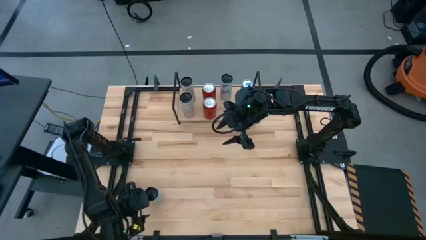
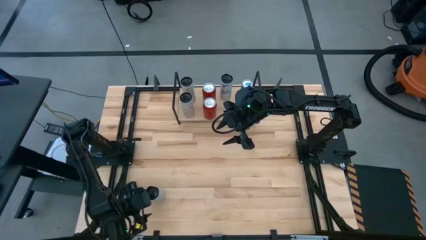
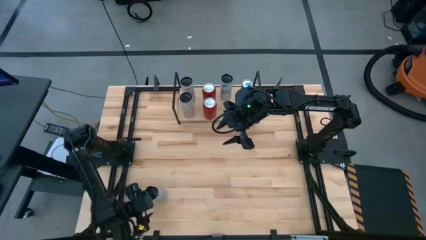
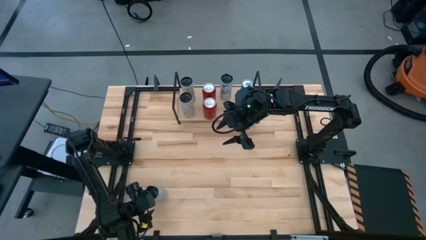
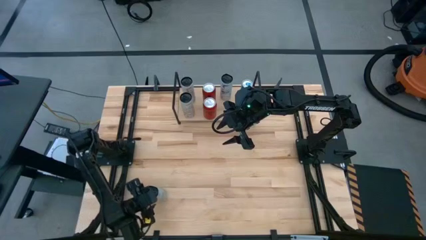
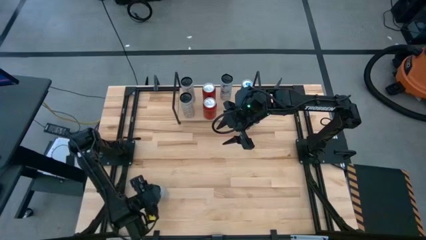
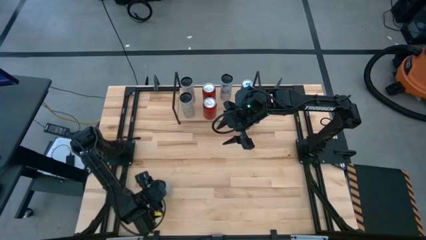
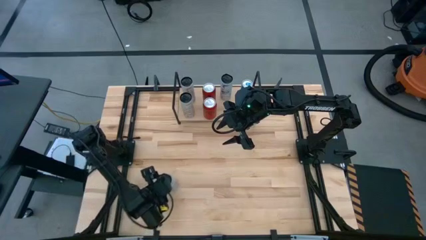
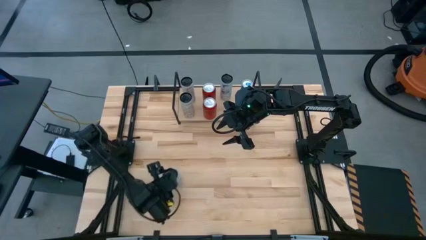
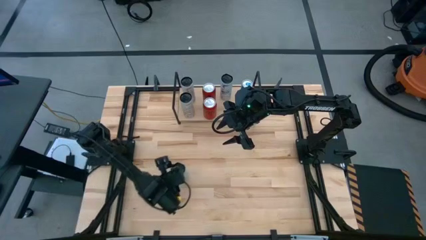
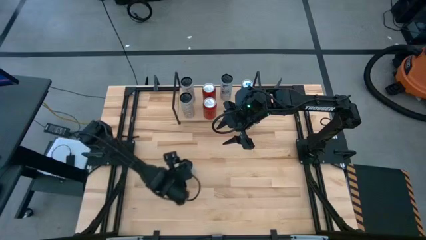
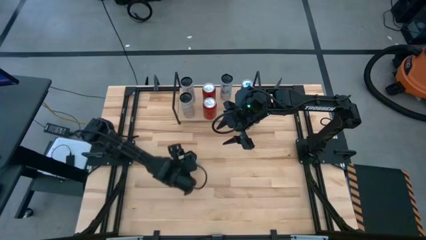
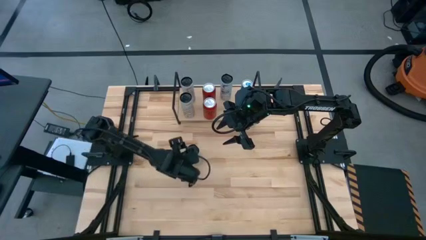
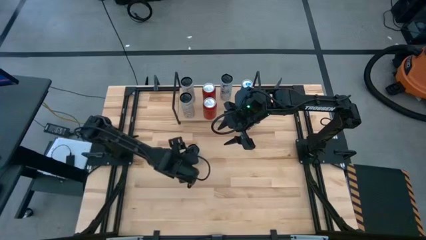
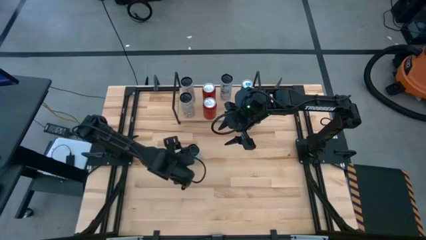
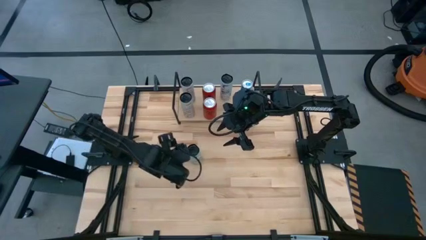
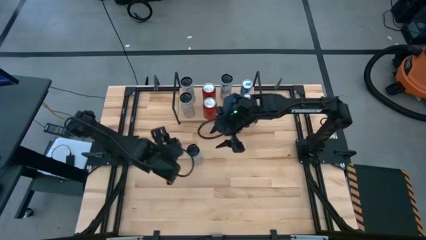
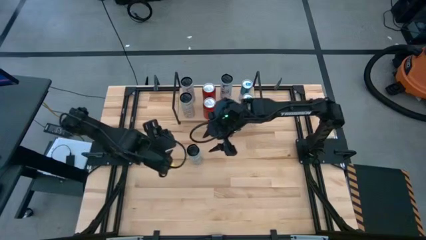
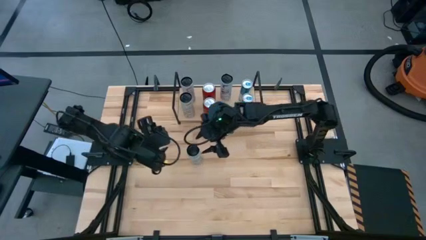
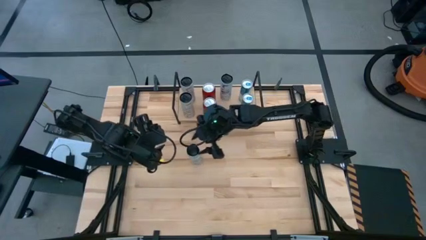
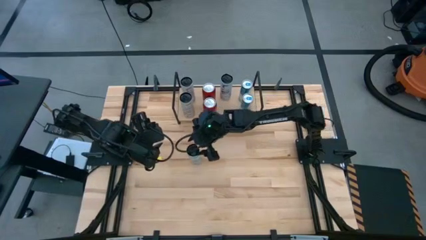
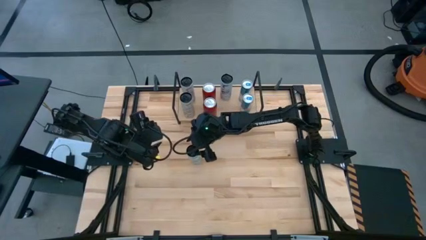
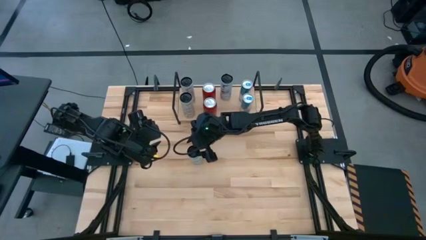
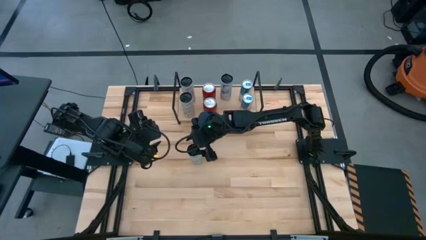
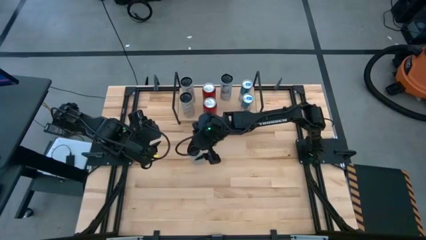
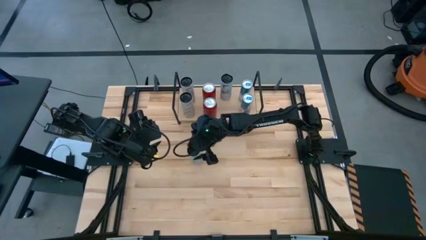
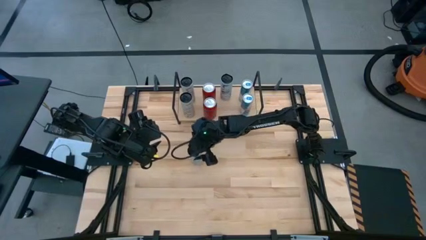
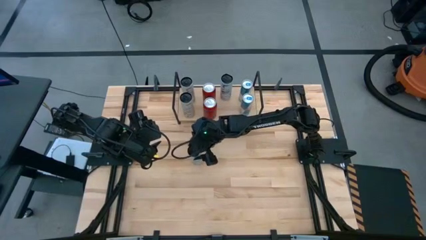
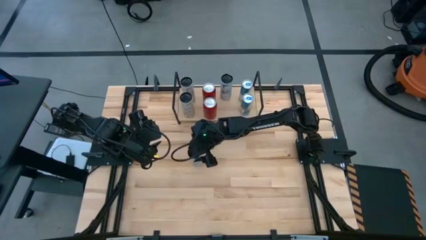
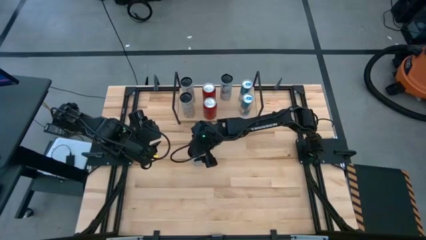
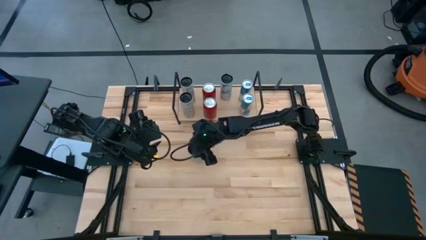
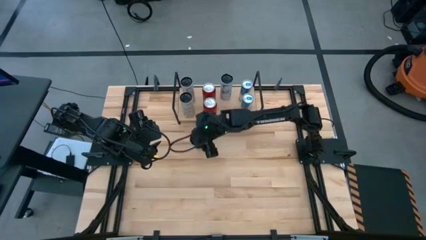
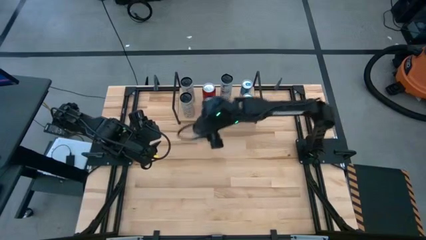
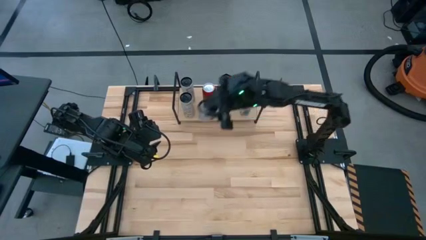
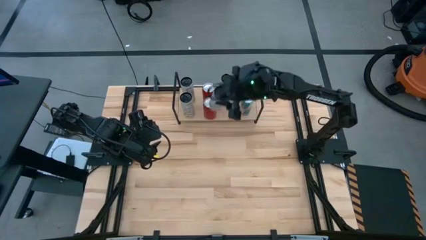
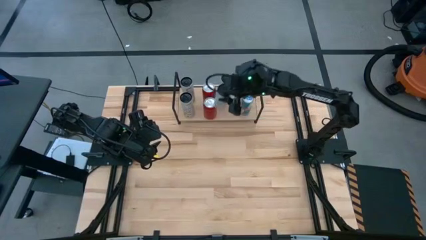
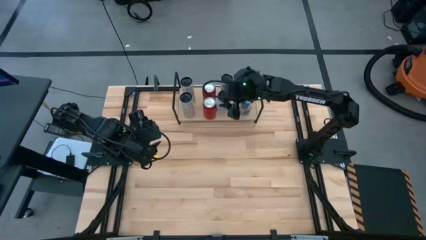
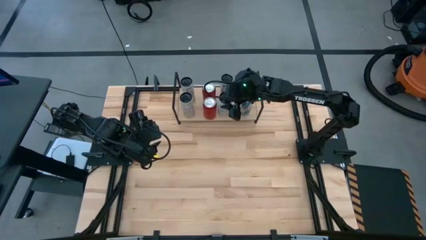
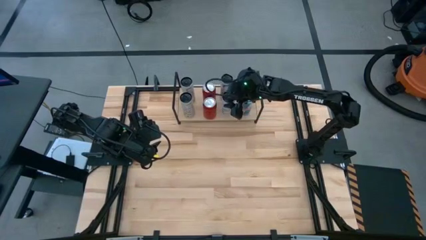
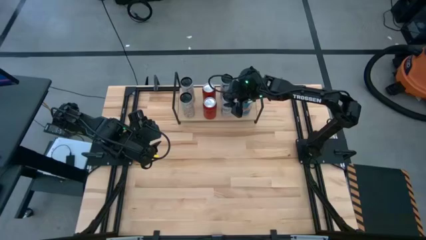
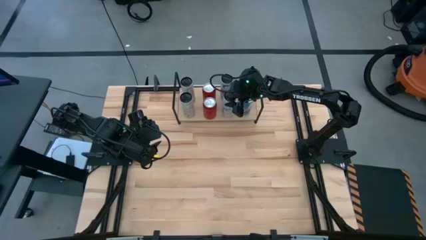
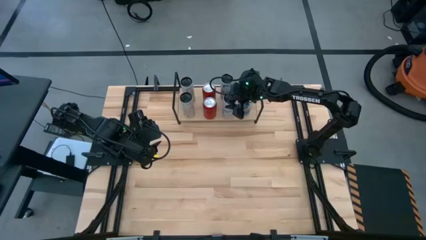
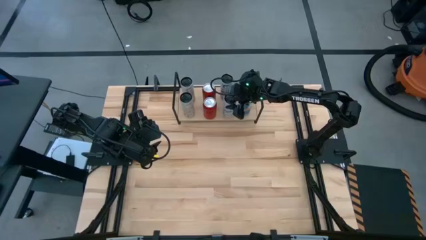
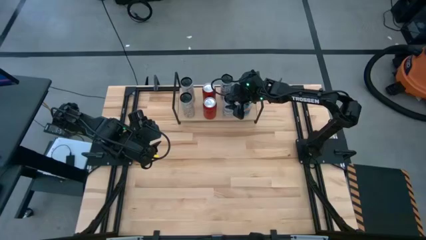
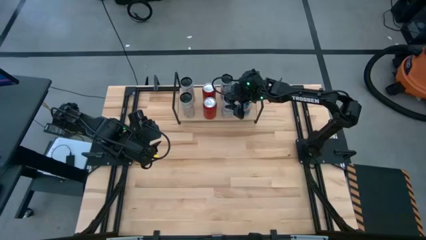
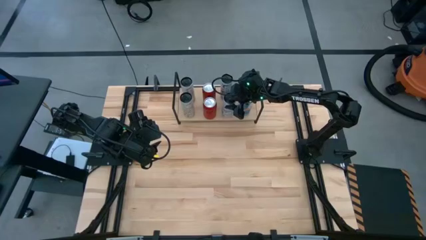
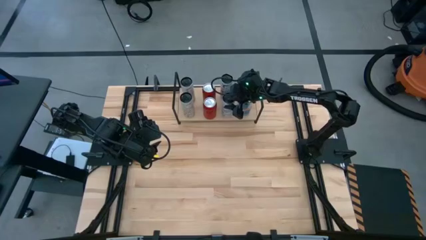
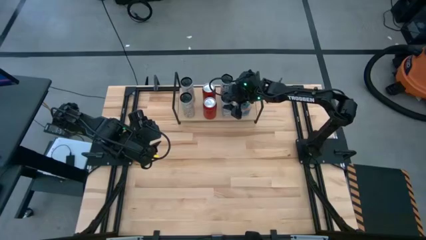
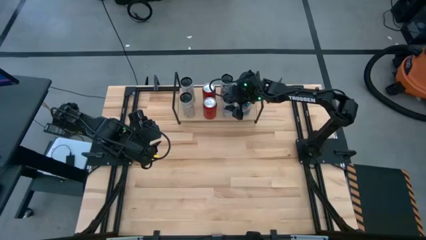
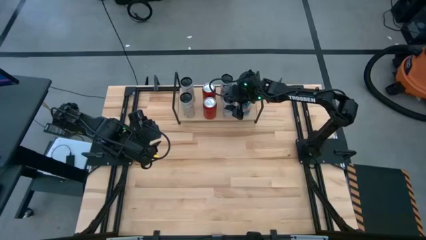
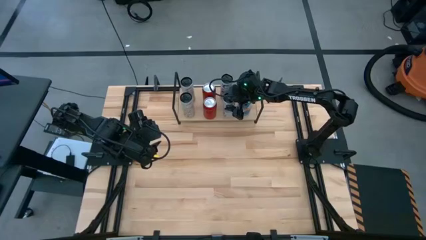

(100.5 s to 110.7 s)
Task: Place canned beverage on shelf
Put the white soda can on the shelf

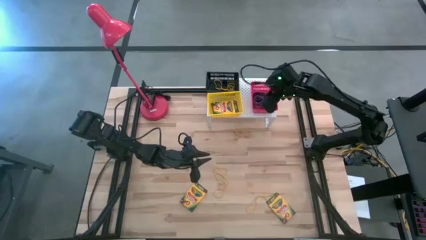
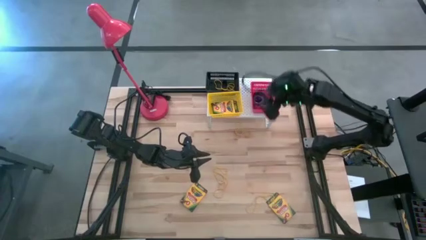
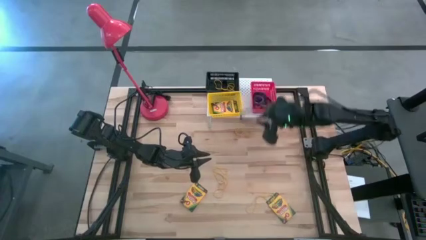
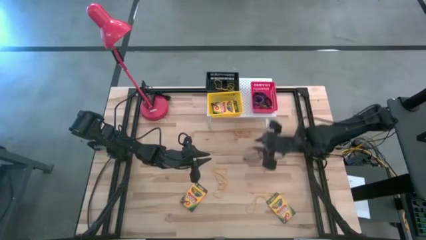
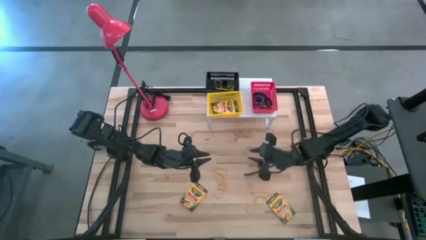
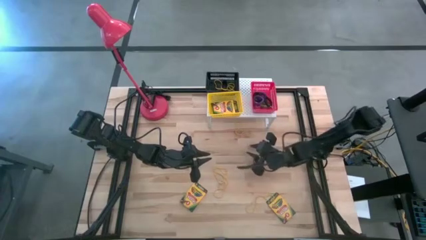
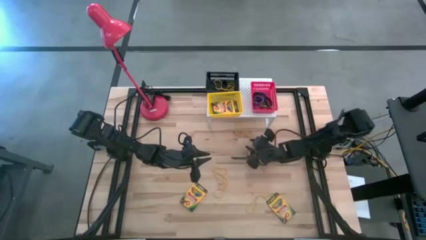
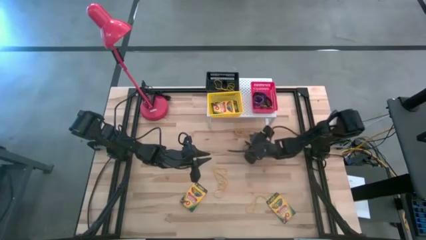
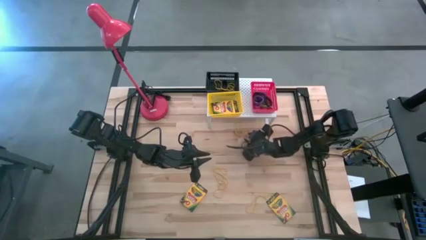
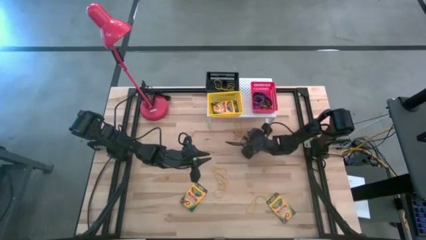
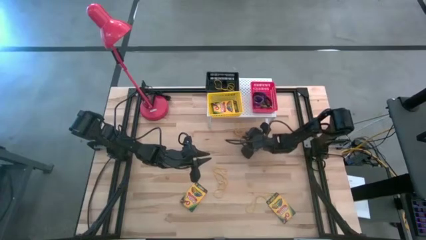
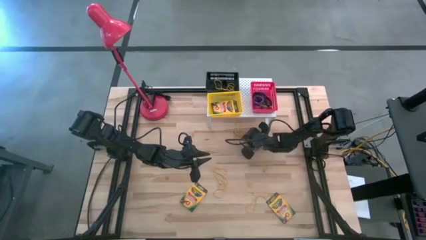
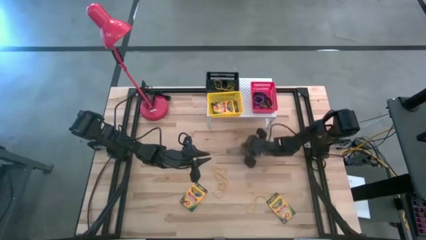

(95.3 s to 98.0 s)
Task: Pick & Place Office Desk Supplies
Put the yellow rubber band into the black bin on the shelf

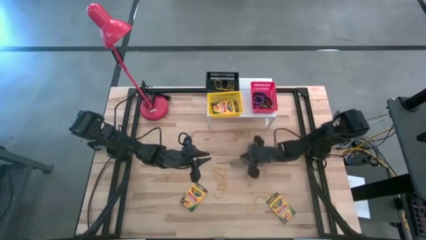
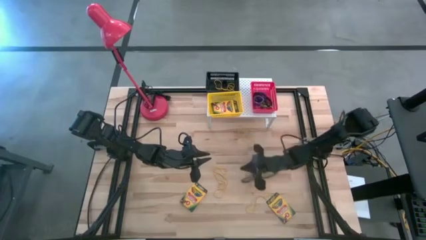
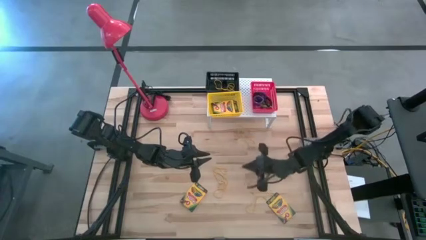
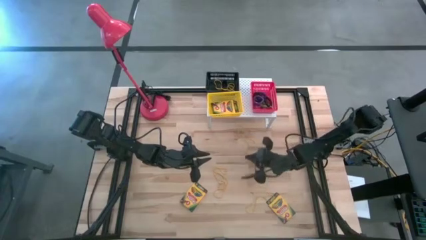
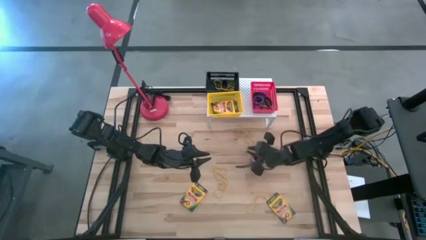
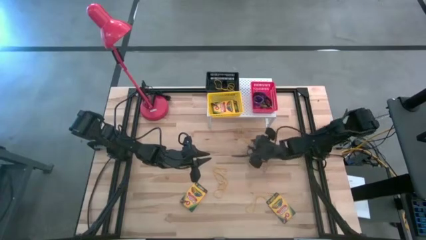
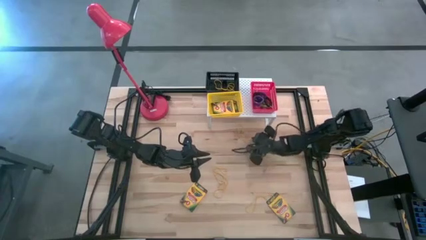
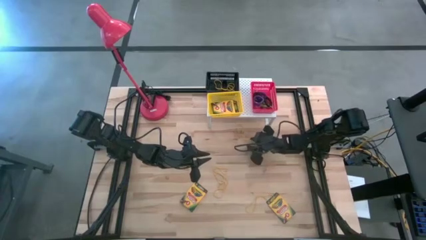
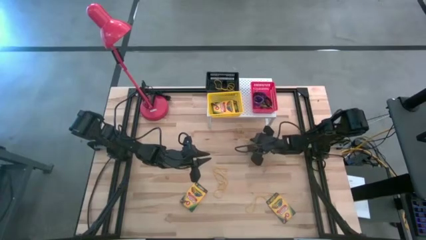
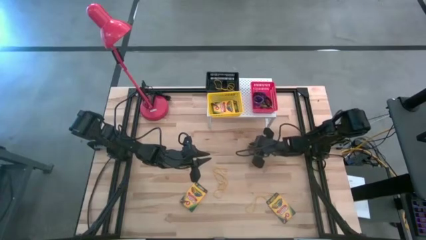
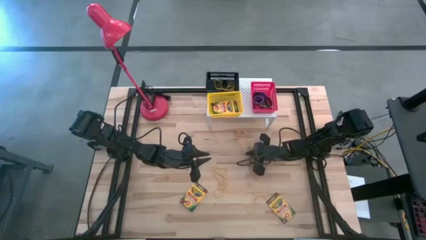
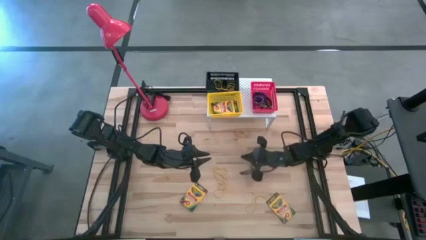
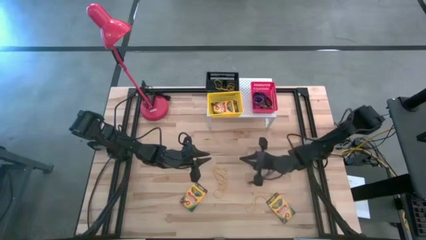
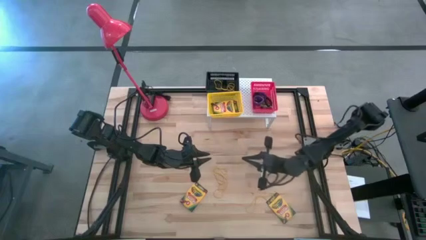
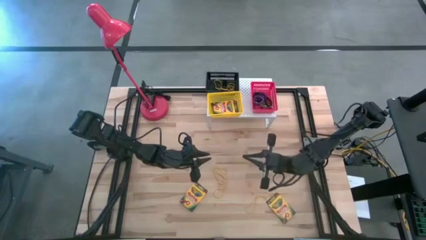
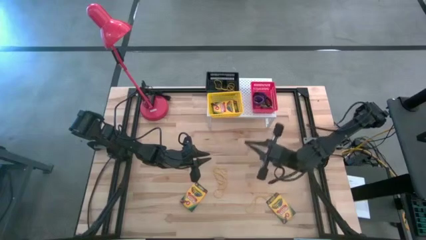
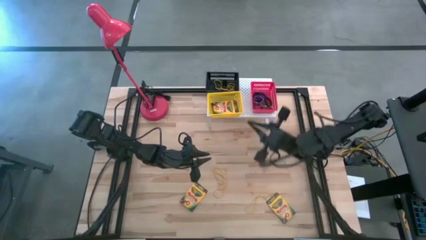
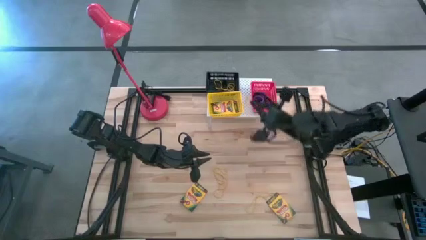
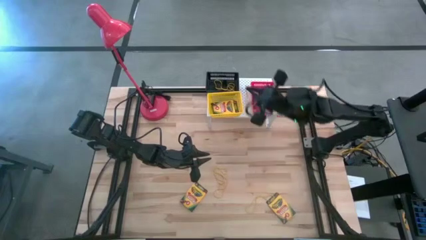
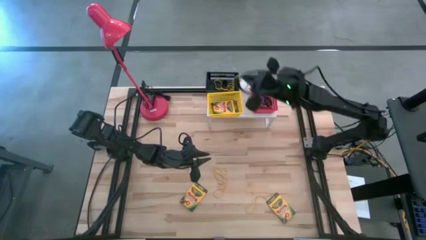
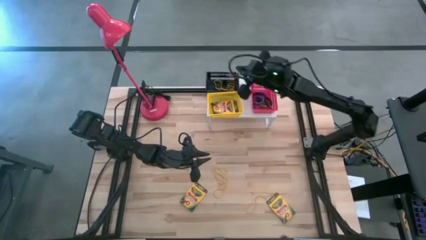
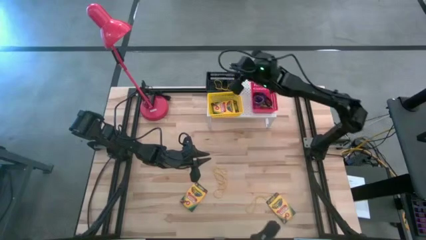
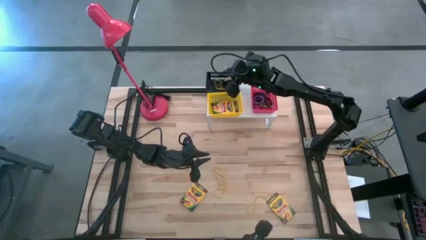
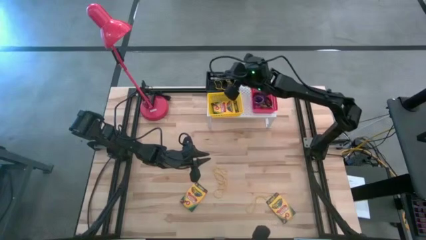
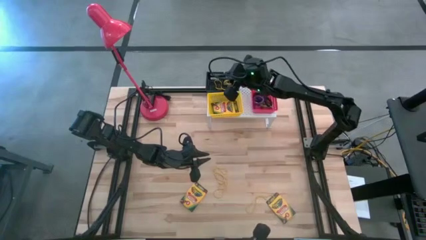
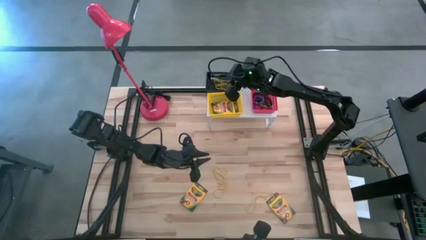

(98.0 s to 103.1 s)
Put the yellow rubber band into the black bin on the shelf
